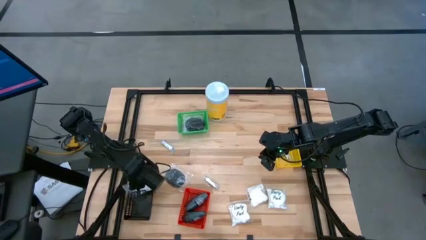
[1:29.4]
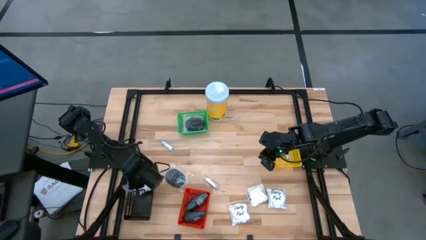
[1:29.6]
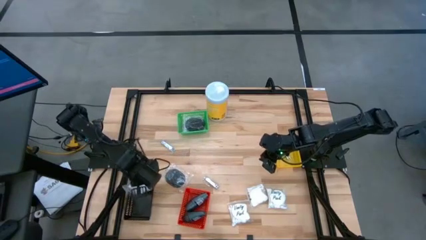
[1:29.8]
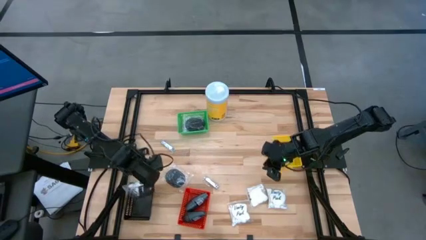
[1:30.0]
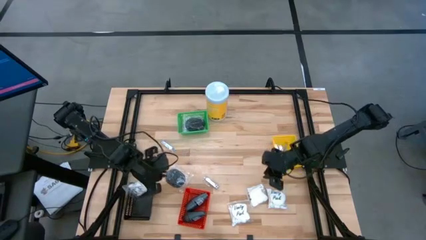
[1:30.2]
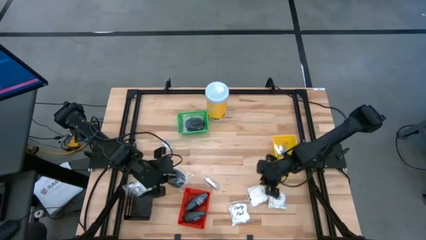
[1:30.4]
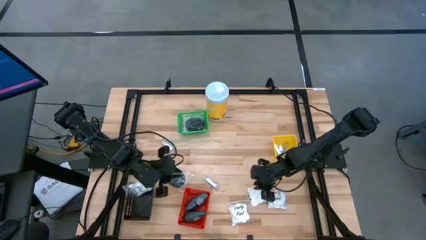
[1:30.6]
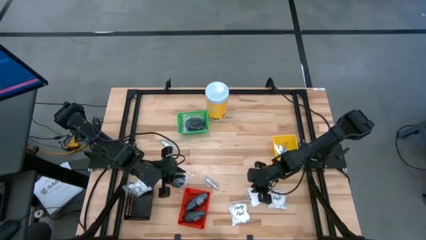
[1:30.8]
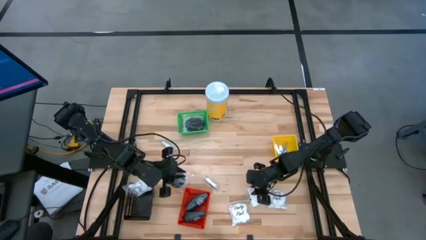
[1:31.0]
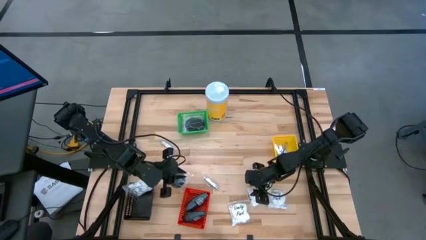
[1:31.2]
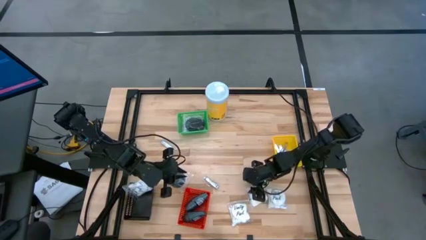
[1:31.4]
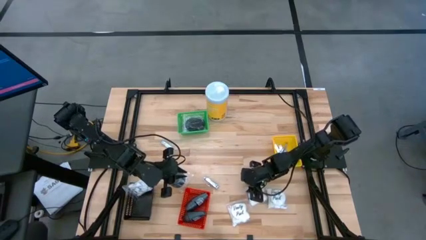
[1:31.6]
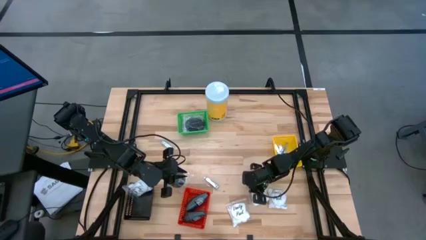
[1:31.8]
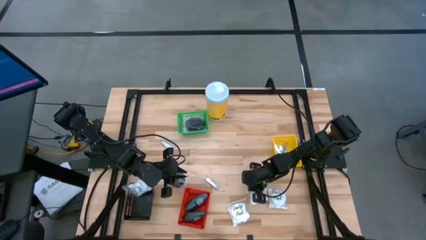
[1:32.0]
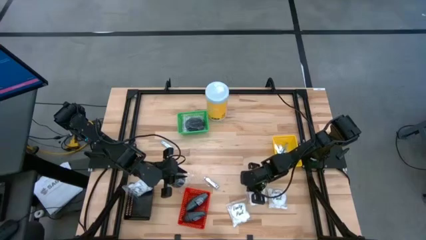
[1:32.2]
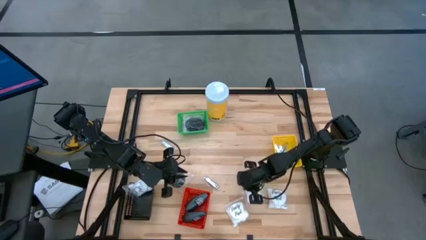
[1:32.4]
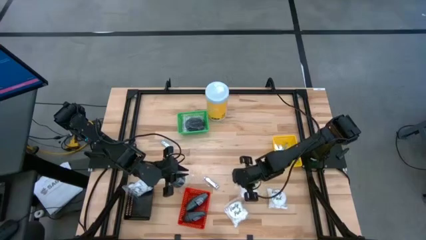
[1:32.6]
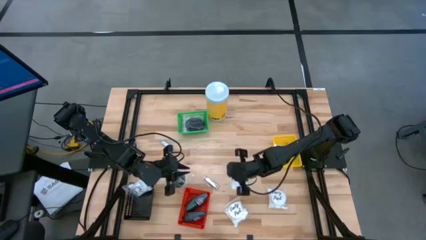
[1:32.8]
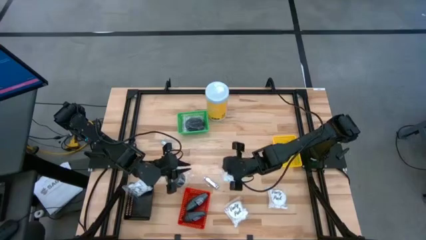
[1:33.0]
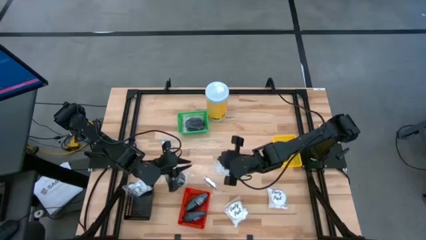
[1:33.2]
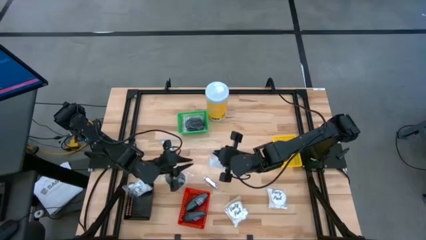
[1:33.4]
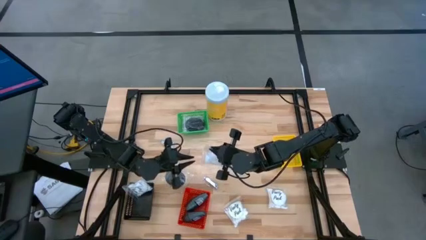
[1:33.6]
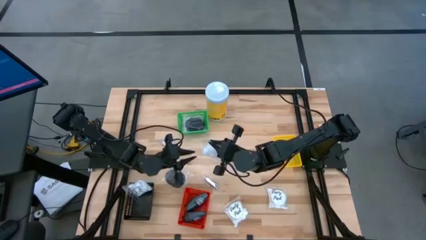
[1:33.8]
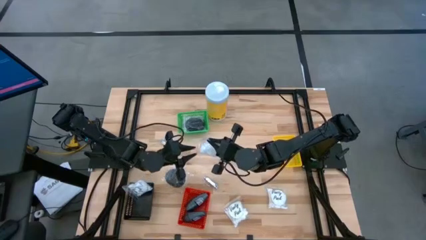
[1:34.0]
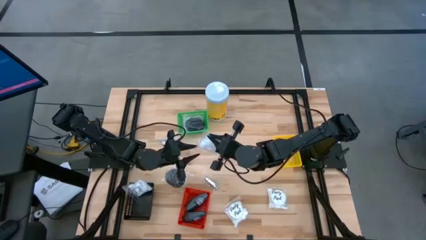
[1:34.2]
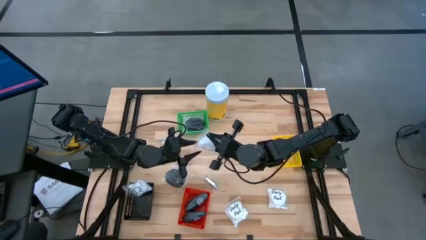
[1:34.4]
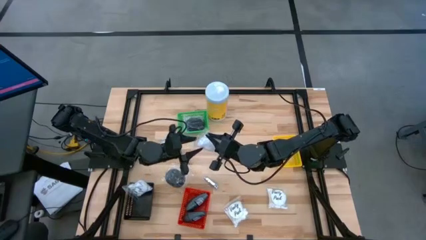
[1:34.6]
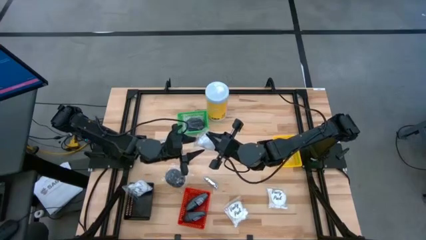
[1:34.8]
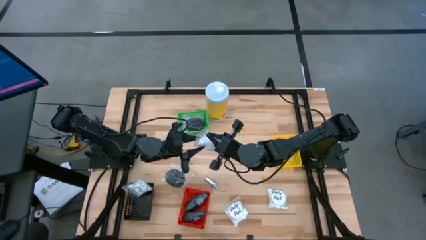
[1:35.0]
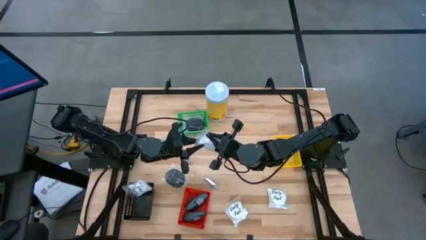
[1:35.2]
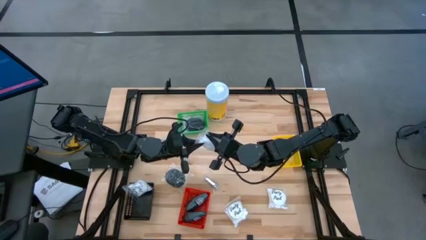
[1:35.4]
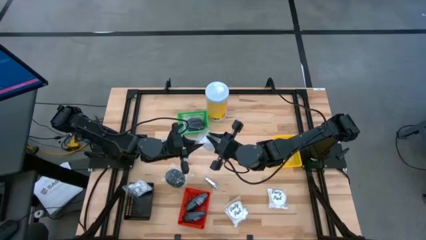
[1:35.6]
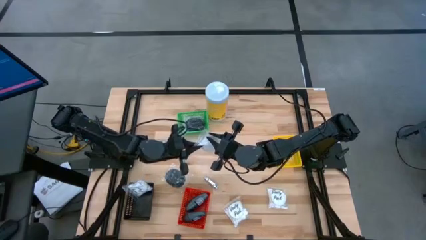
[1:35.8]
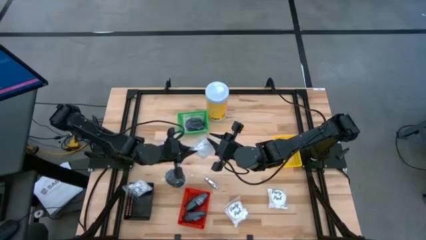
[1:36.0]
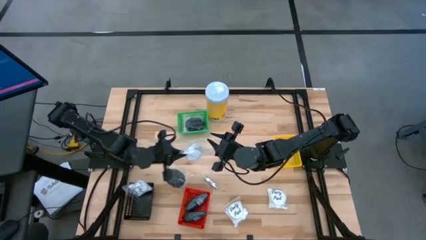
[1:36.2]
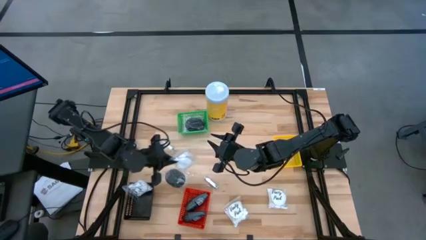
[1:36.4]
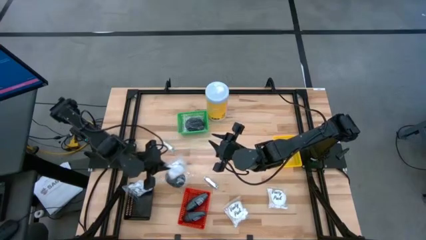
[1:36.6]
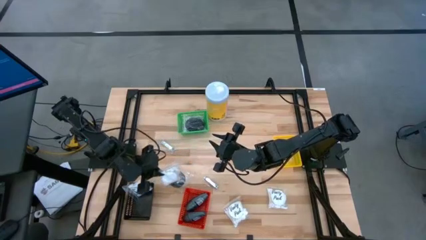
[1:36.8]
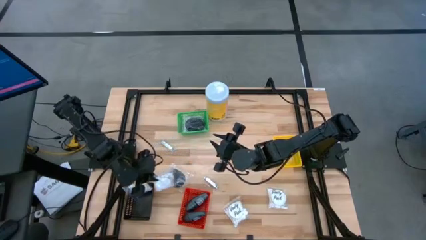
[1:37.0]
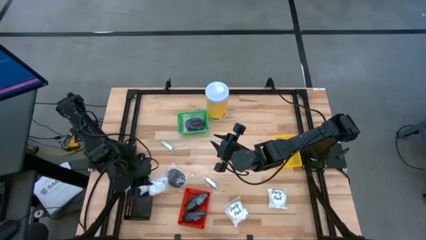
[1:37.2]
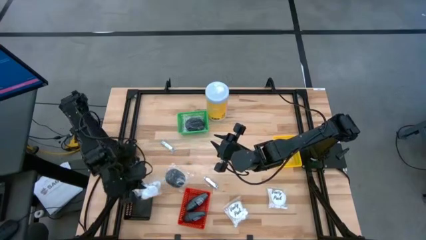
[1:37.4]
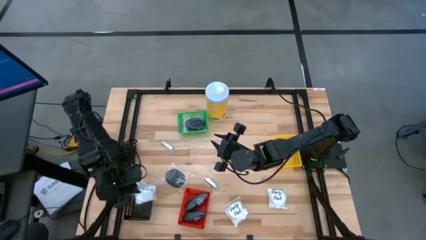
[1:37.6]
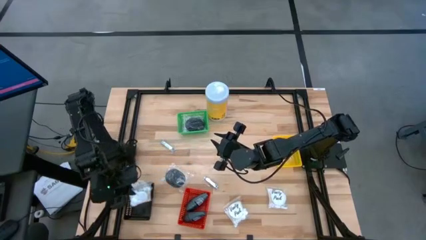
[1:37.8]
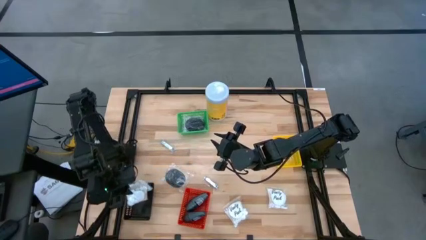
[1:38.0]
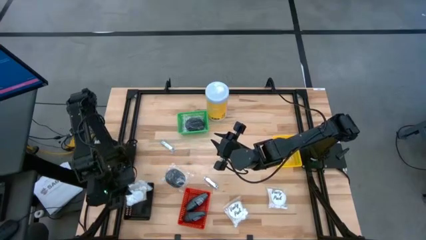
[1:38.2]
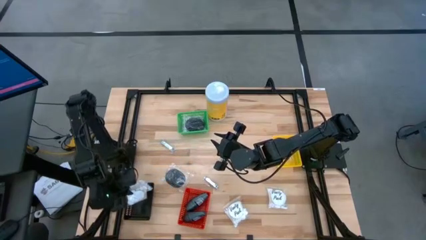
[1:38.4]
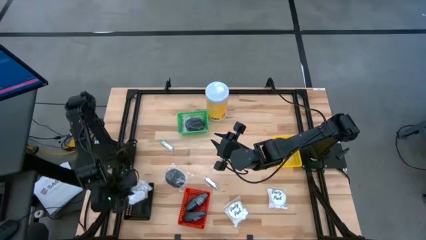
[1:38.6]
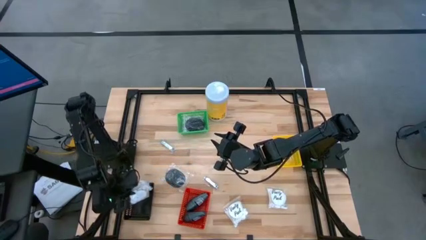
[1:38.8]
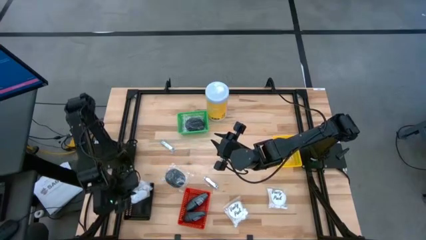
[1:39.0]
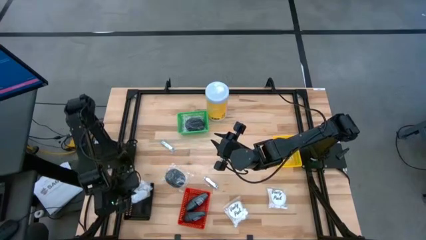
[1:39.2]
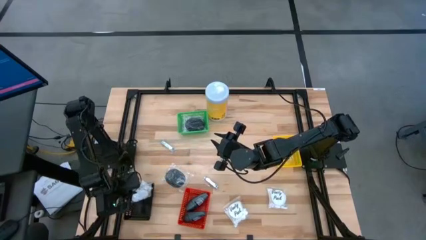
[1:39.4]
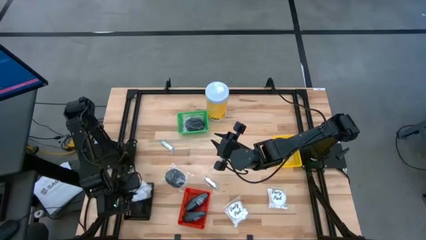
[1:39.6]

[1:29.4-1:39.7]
Task: Pick & Place Travel size toiletries
Put the white cotton pack into the black bin

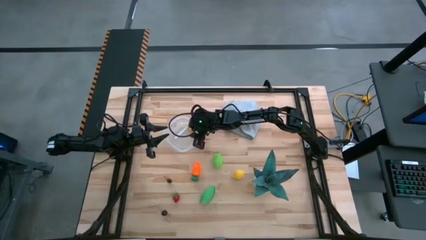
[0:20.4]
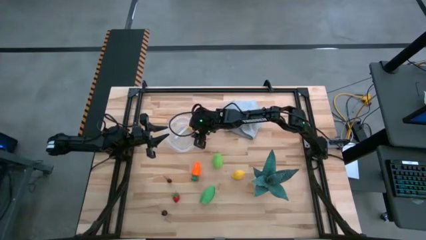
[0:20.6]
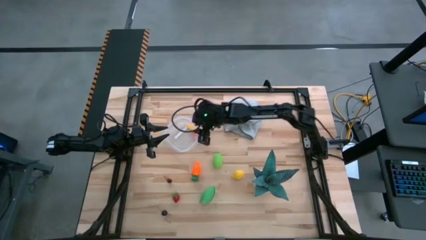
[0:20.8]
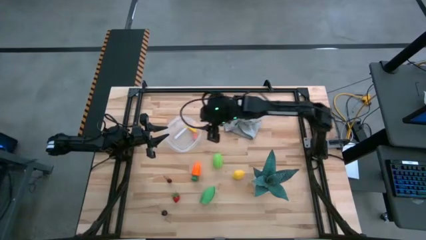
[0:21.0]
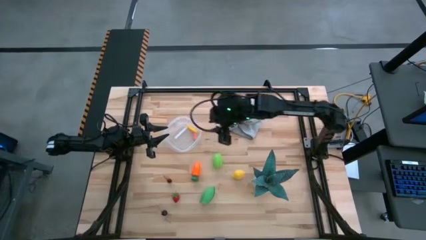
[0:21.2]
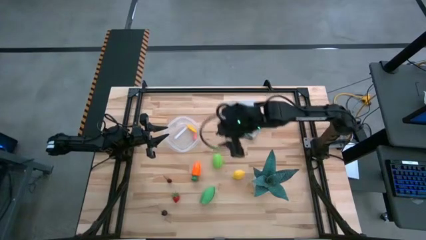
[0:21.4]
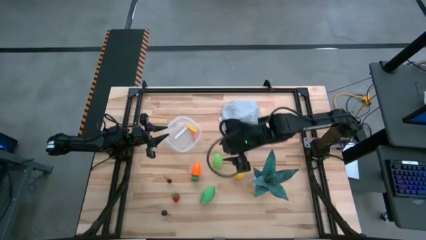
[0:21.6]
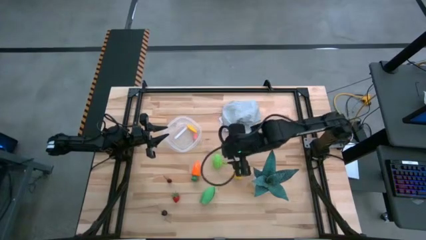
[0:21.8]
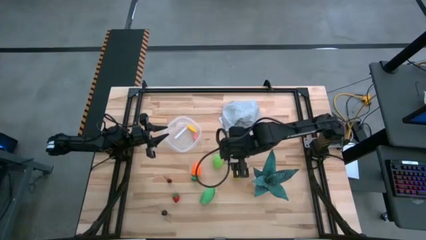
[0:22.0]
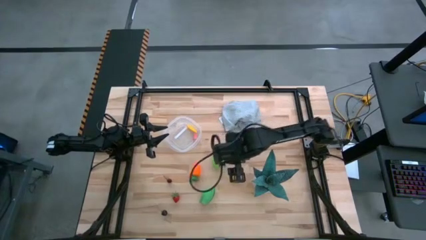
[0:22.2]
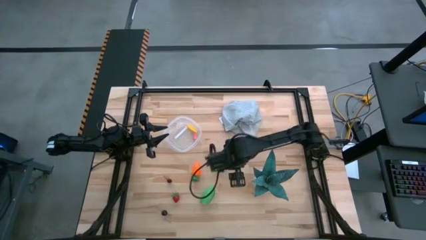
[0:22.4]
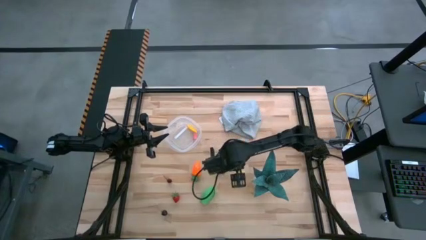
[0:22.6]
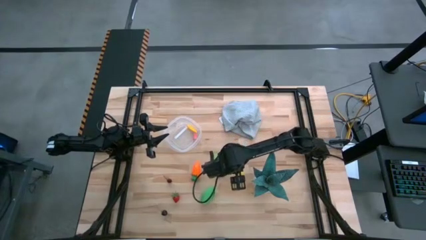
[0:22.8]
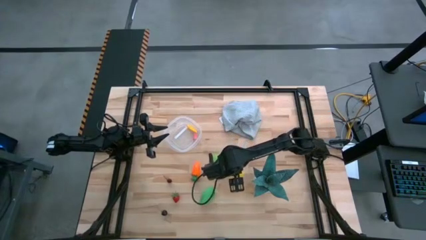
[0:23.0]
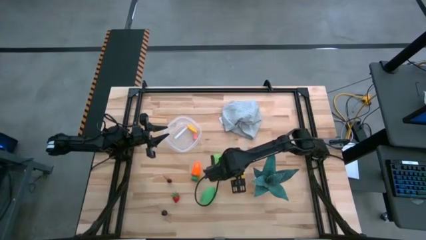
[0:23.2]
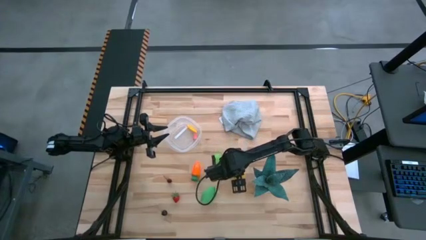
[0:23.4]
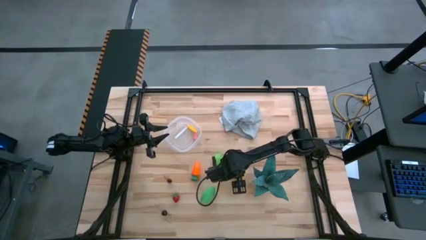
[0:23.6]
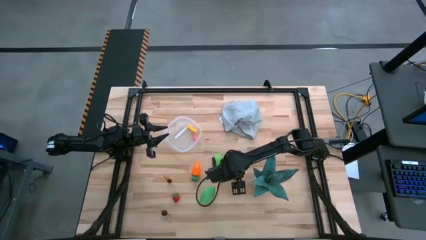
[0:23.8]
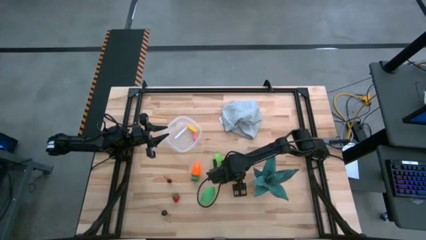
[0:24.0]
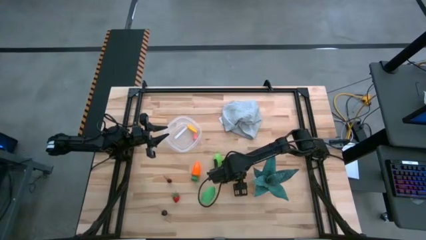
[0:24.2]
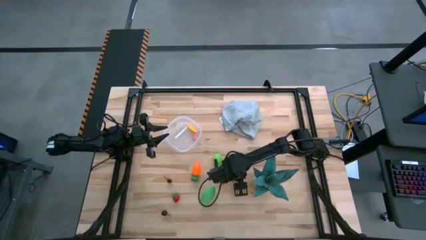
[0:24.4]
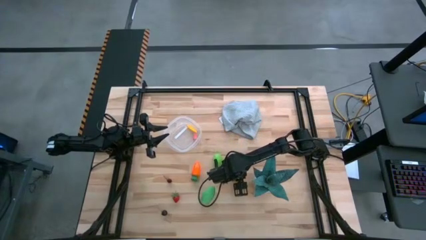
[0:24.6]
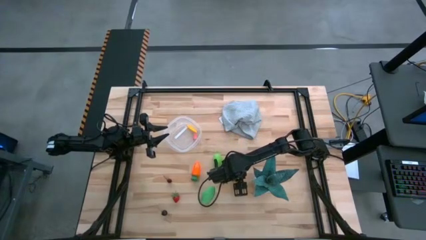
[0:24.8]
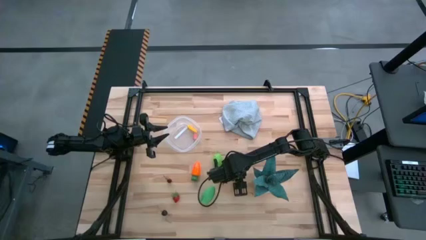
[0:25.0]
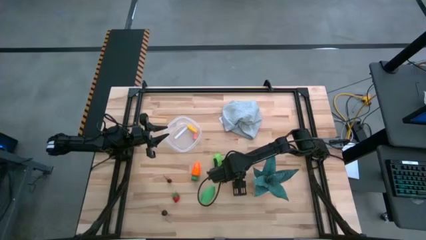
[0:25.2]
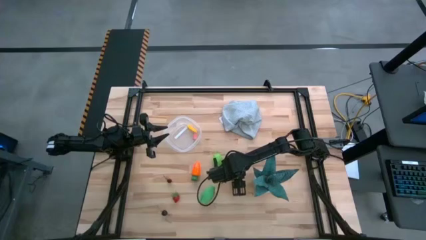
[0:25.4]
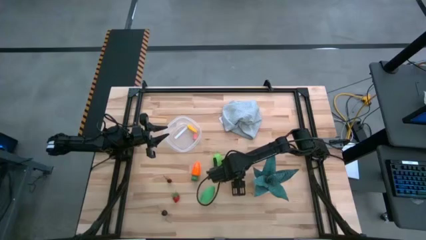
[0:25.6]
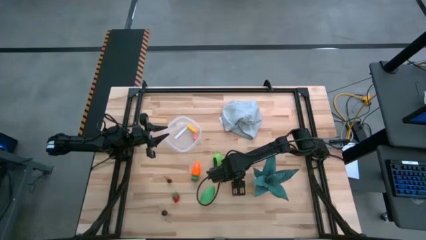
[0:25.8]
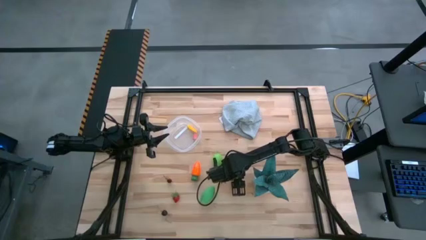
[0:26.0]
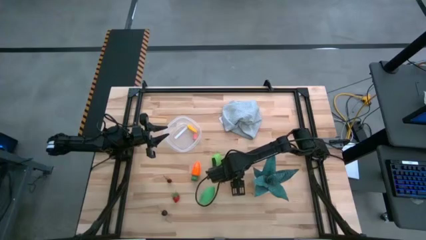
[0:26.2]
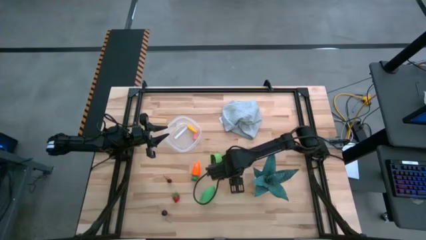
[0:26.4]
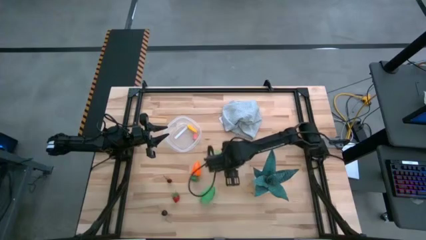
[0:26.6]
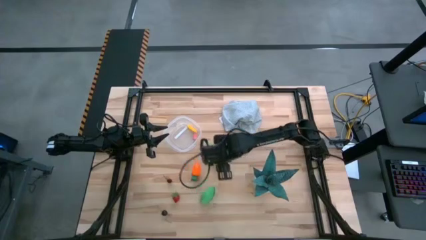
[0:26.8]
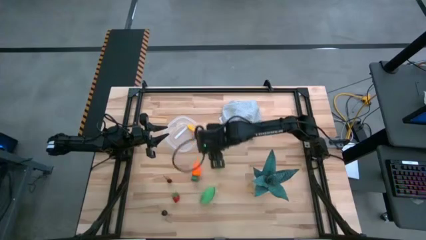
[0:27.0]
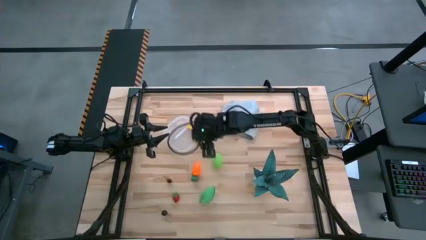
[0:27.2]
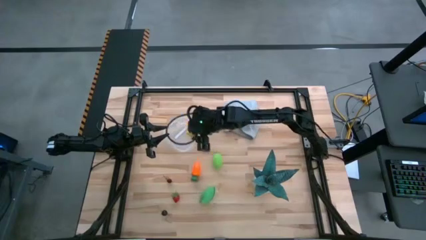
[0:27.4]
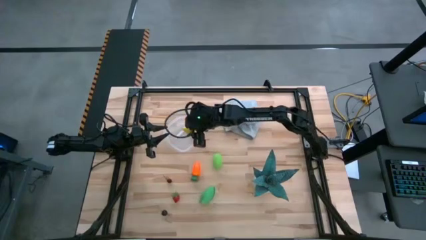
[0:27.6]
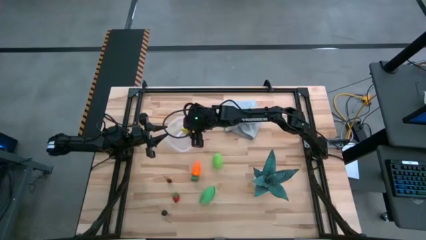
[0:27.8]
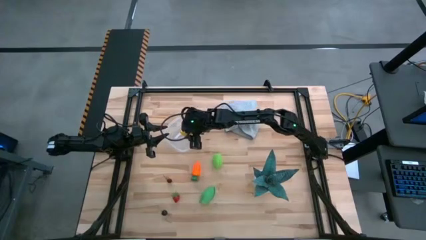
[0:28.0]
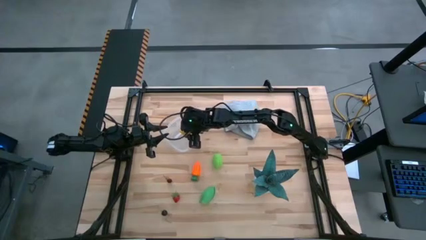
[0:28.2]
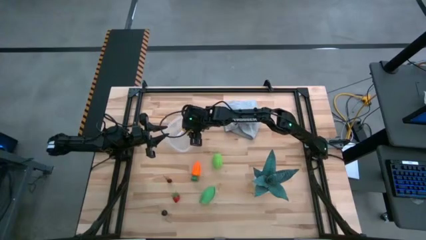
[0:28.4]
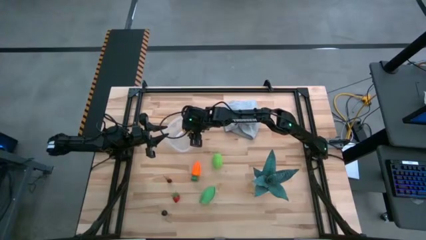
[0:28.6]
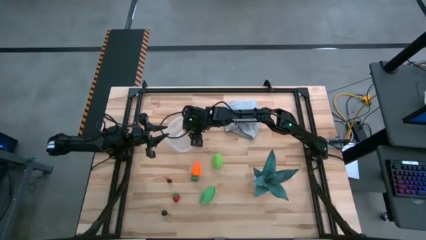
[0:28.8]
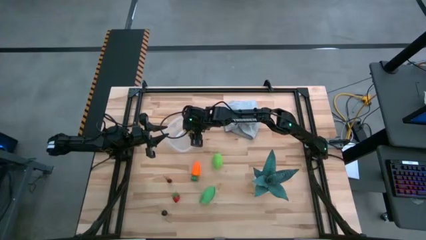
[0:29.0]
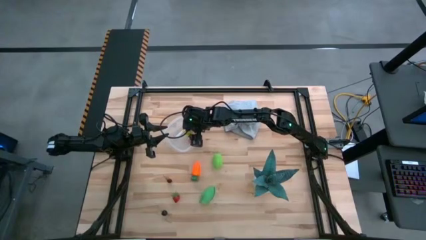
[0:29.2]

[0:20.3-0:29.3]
Task: Pick and placing Produce into tupperware
Put the yellow lemon into the transparent container
